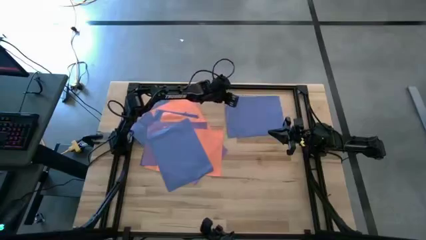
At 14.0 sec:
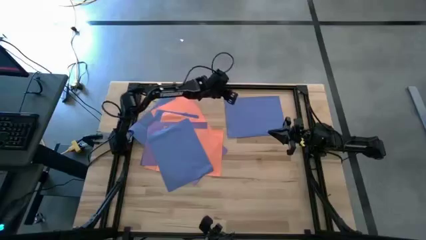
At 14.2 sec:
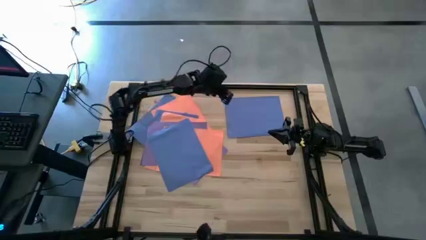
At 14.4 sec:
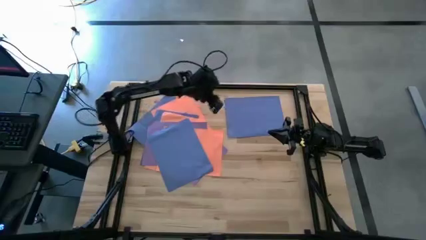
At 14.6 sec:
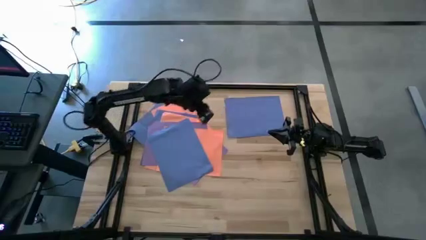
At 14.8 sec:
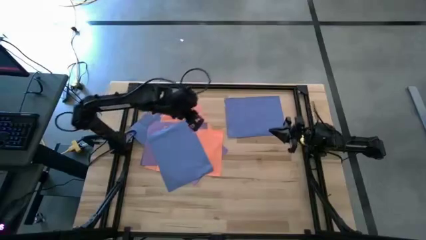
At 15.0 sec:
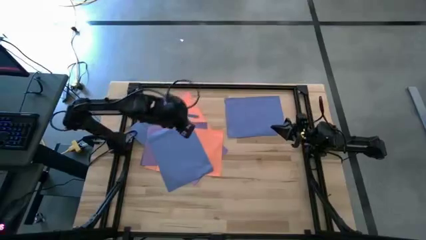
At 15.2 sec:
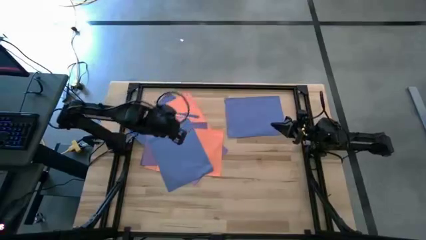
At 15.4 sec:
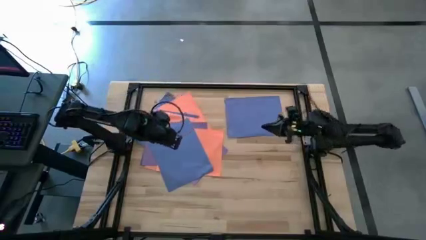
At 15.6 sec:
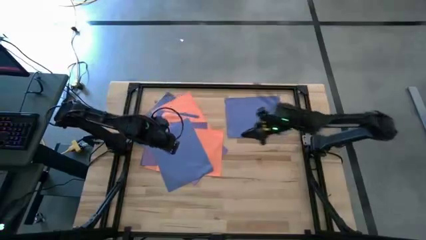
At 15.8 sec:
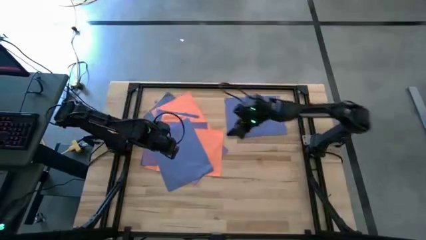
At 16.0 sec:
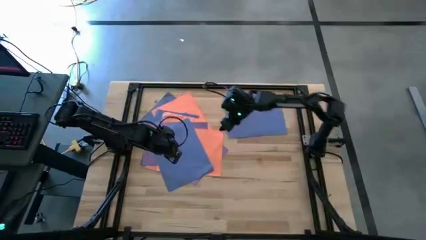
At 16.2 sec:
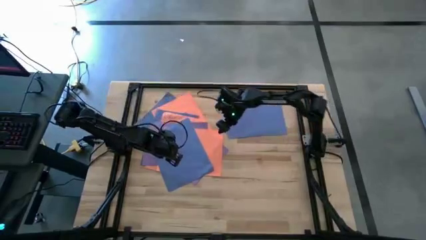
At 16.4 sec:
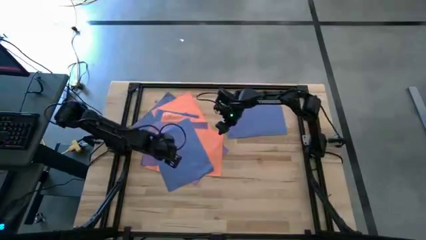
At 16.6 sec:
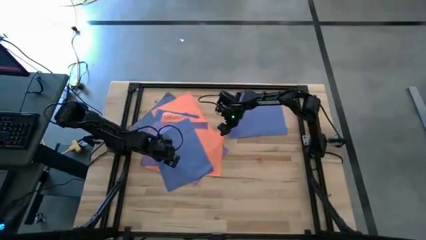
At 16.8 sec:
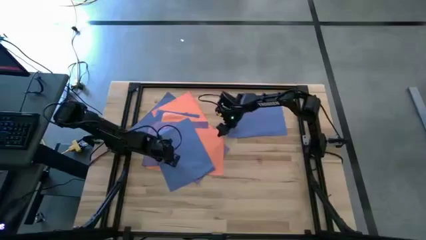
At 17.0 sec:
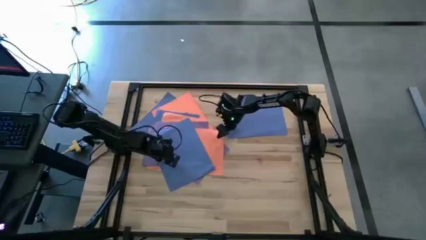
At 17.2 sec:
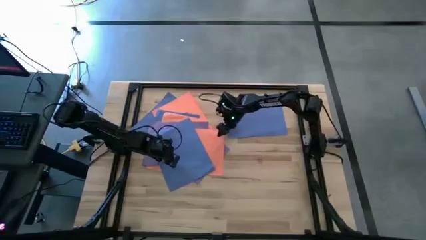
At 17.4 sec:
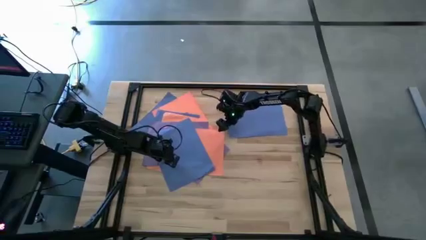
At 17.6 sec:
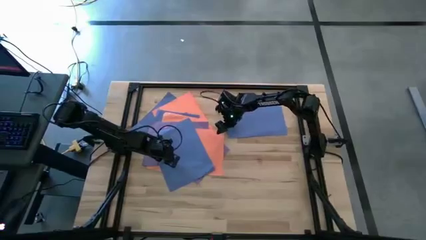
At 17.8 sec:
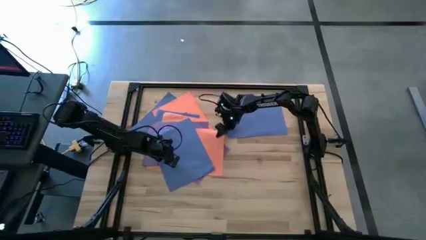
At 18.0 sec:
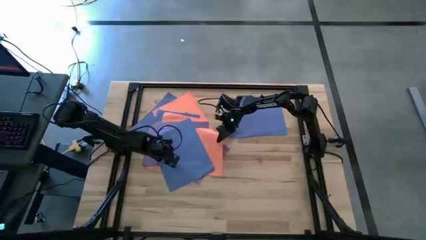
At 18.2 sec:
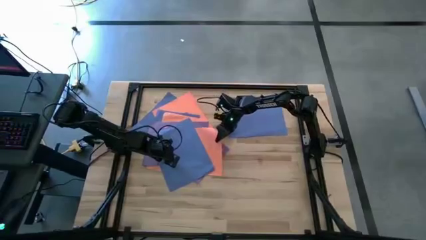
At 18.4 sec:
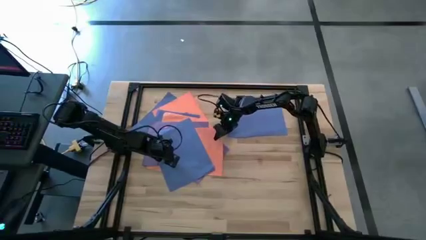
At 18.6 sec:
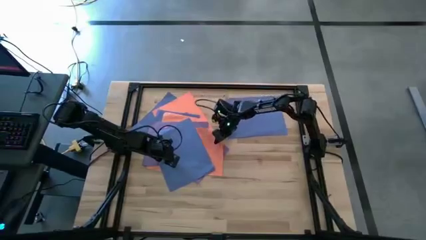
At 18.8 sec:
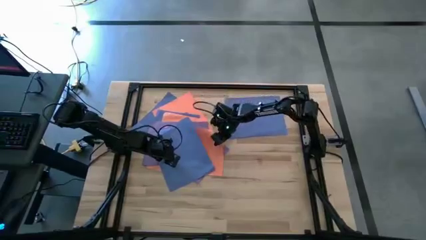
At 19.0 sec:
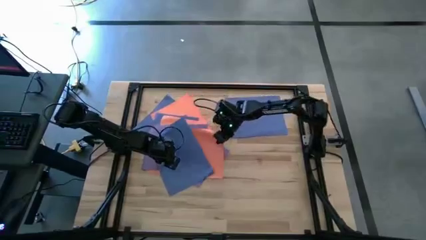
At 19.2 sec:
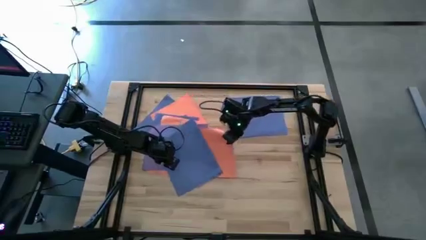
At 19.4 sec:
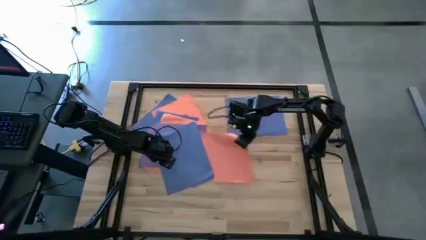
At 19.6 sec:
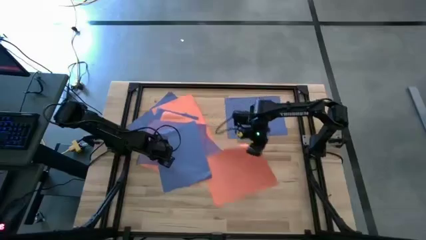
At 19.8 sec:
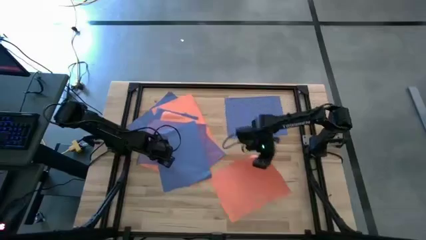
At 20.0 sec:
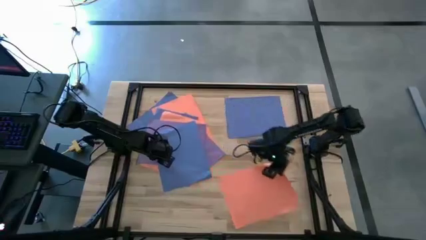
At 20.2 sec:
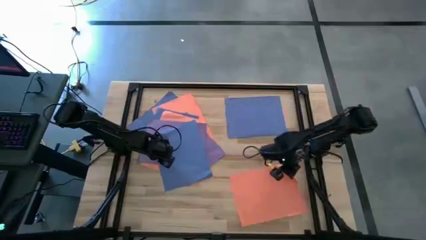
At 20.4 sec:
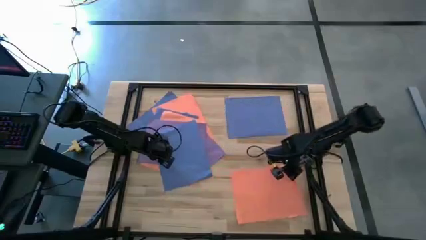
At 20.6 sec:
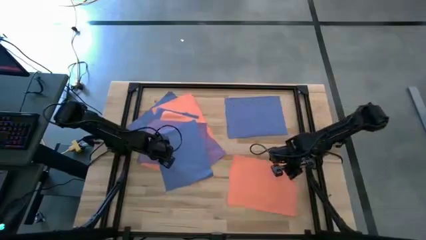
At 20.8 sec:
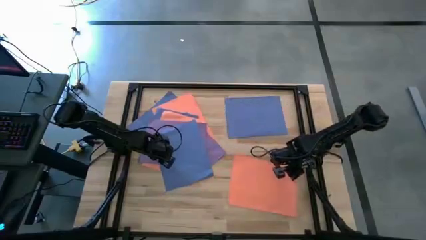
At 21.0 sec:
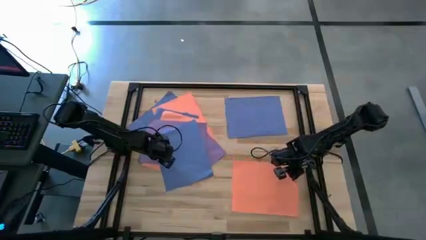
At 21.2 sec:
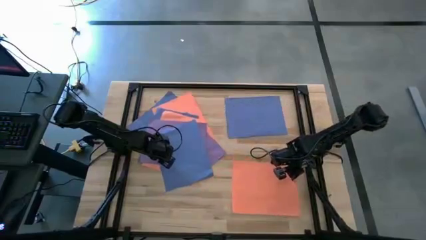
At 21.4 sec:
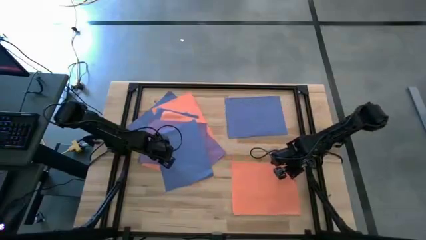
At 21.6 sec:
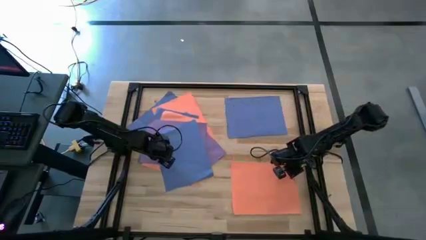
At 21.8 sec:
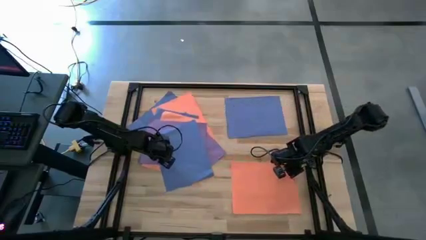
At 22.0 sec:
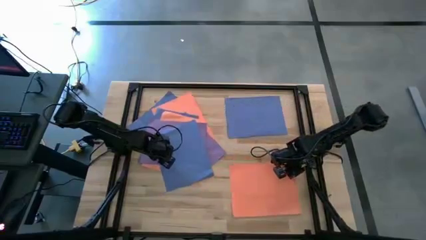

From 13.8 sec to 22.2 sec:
Task: Organize paper
Put the orange colored paper on the bottom right of the table

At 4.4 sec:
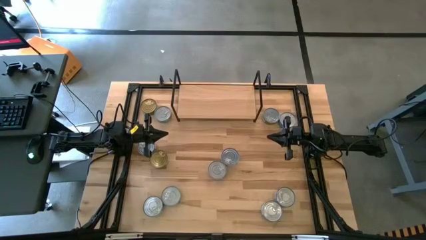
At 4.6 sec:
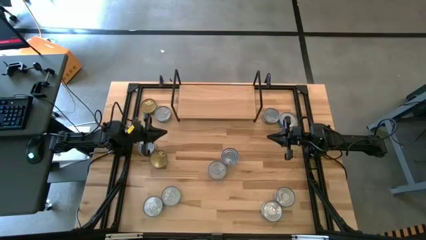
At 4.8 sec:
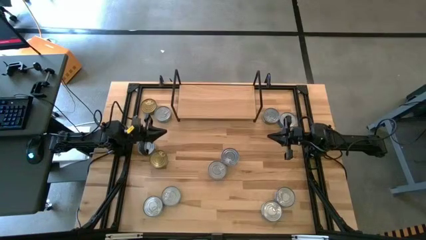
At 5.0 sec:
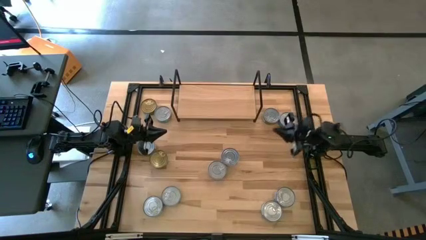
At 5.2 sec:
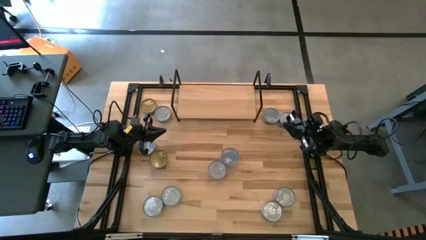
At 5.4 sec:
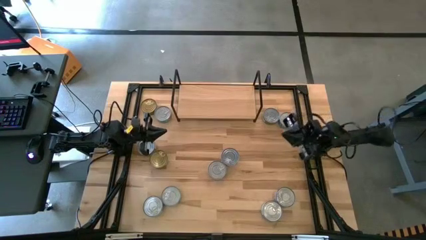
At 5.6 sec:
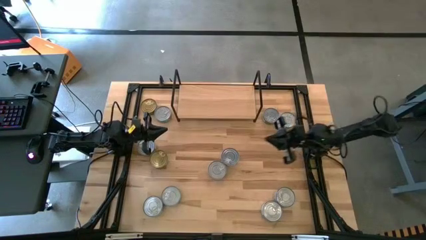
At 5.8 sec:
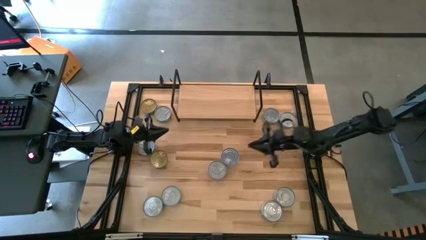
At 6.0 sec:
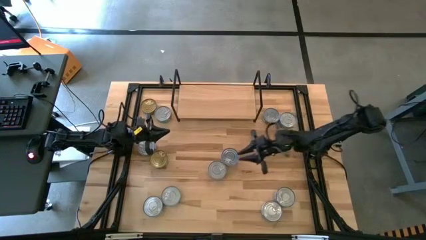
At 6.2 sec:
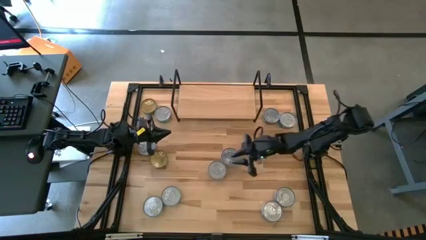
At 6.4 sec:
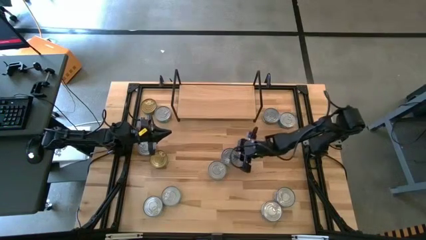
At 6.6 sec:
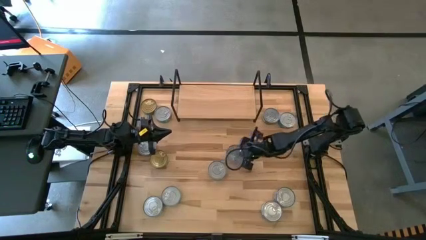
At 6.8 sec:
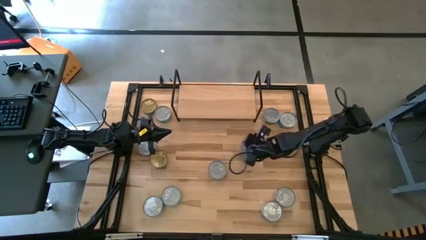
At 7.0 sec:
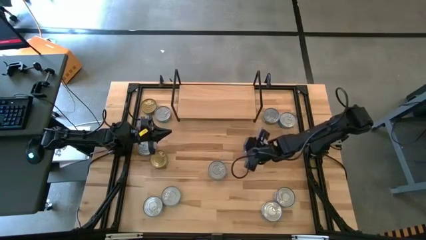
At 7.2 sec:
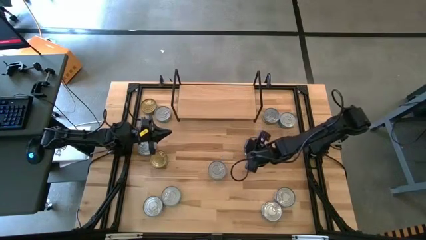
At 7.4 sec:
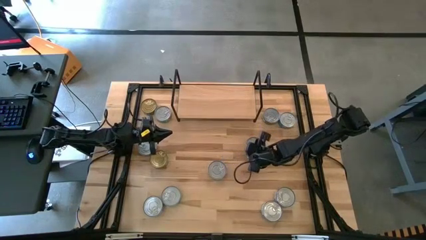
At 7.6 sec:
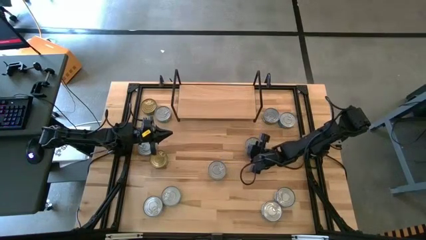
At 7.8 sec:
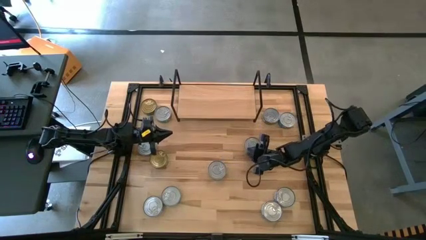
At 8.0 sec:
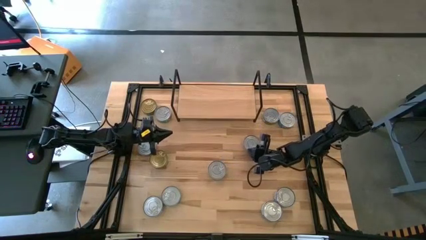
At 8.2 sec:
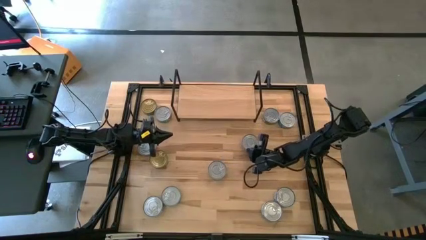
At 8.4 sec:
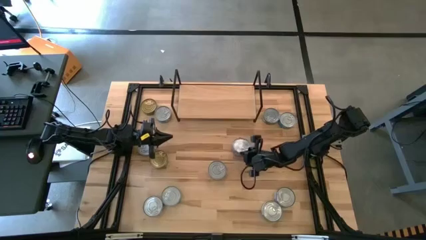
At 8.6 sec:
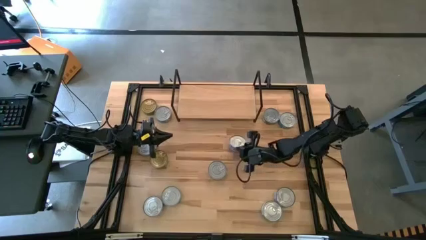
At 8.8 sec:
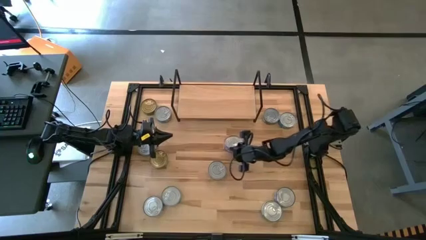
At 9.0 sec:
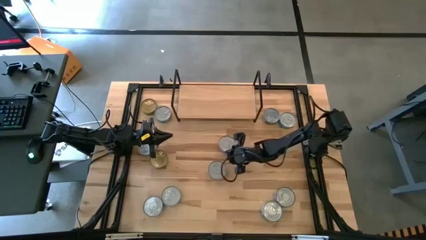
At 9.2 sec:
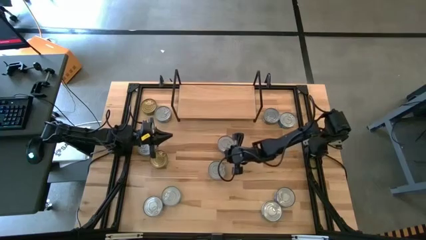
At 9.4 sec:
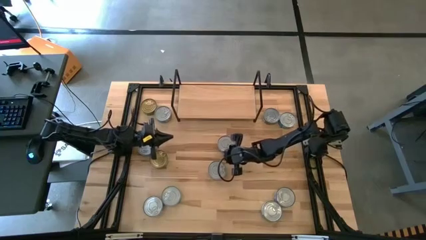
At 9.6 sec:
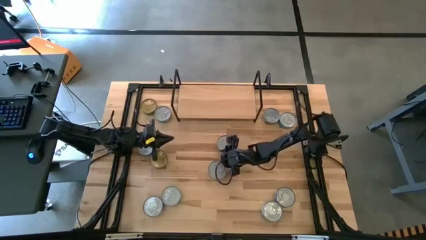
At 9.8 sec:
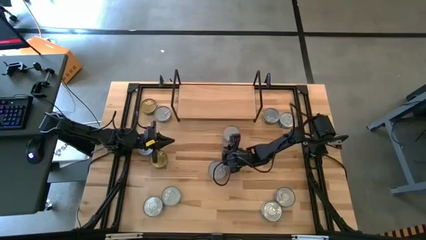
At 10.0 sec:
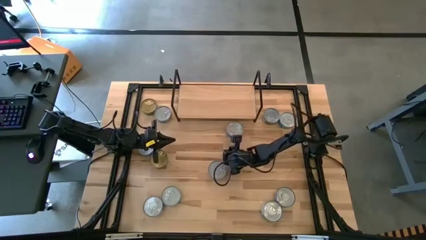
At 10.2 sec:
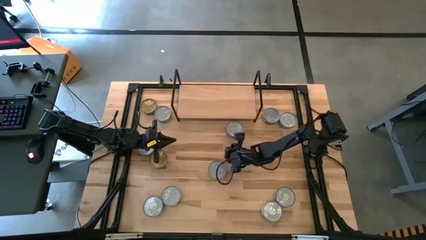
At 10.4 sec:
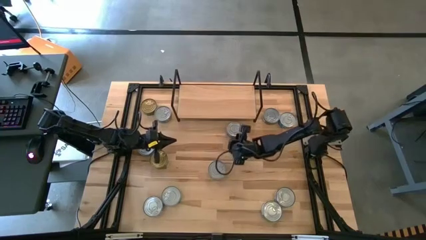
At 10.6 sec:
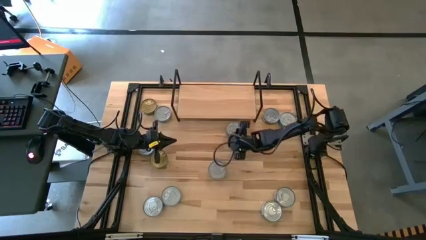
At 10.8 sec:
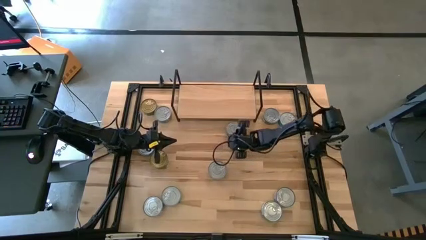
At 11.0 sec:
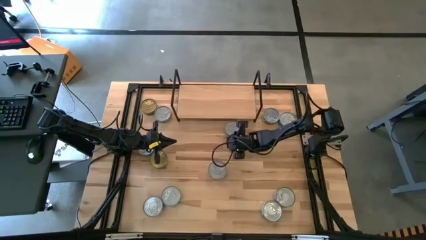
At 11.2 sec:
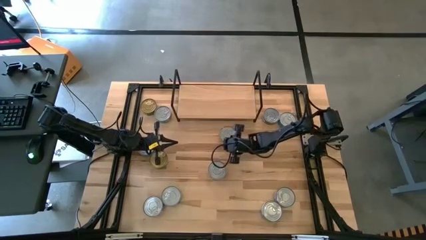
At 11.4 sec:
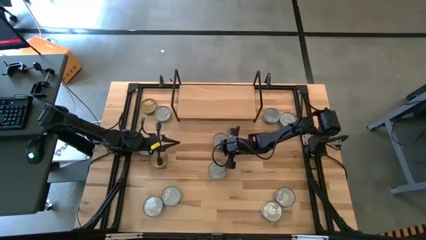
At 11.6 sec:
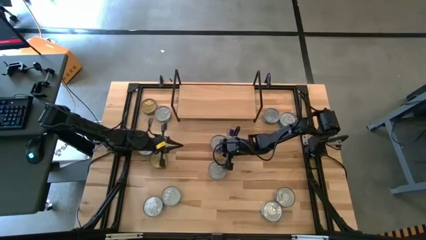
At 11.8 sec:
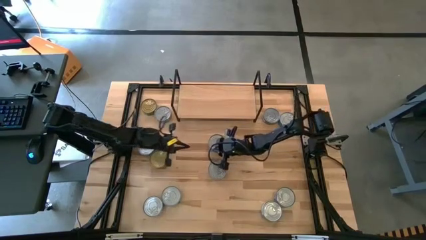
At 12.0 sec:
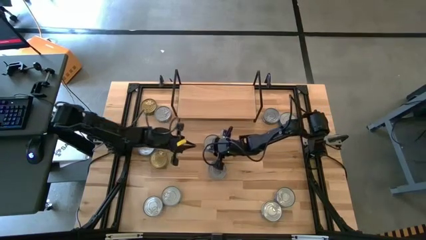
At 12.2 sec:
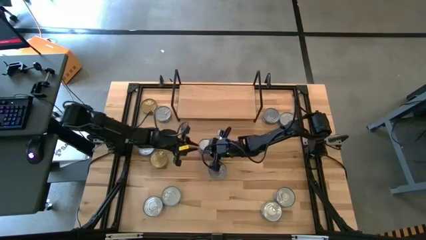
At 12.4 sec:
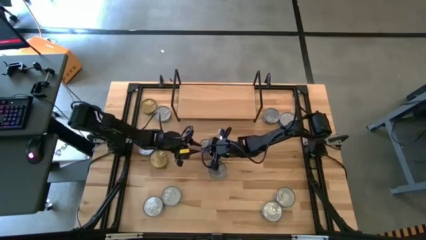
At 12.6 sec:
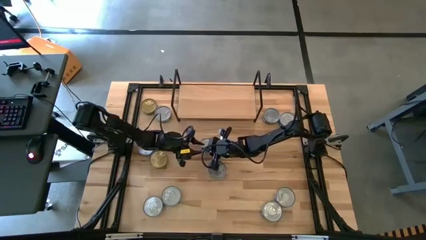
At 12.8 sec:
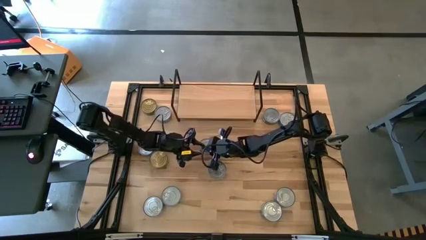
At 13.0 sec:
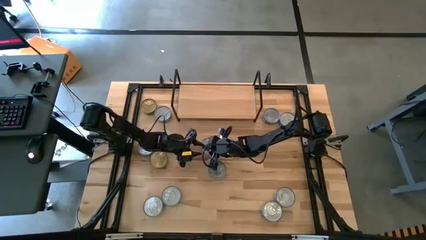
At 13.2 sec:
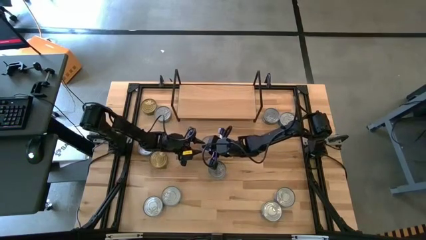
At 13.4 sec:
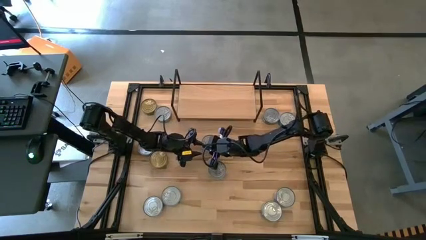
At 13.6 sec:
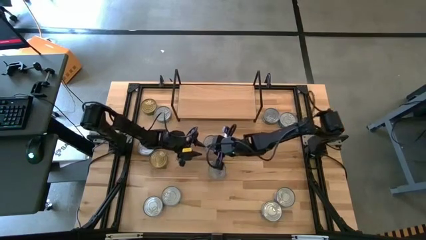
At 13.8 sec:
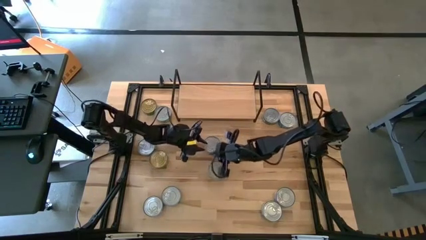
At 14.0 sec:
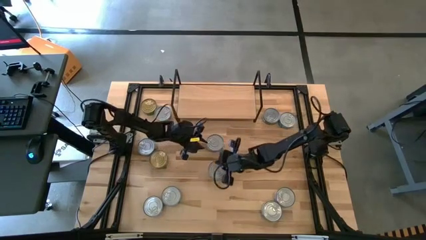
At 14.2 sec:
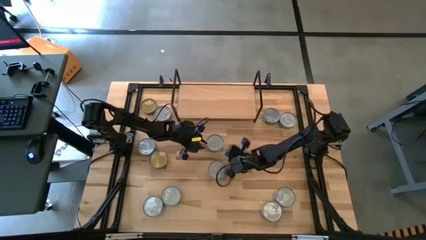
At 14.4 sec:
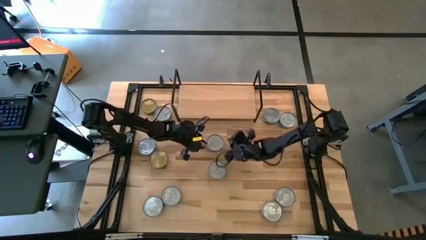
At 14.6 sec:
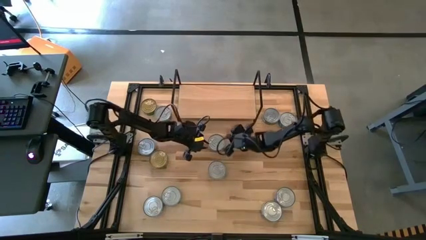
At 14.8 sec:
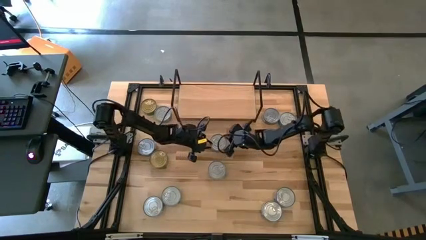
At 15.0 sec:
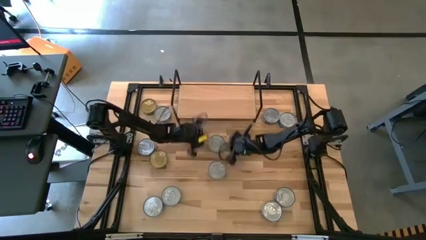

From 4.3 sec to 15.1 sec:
Task: Stack canned seafood by type on shelf
Put the blue tuna can on the shelf
